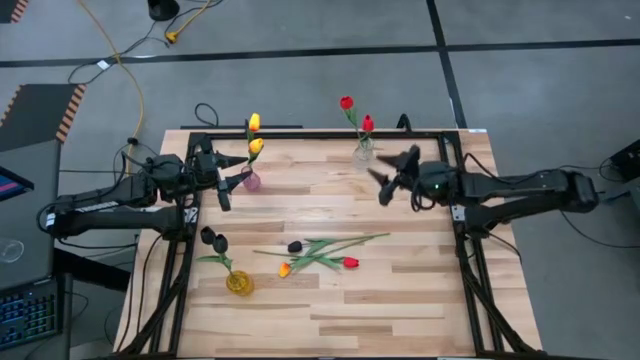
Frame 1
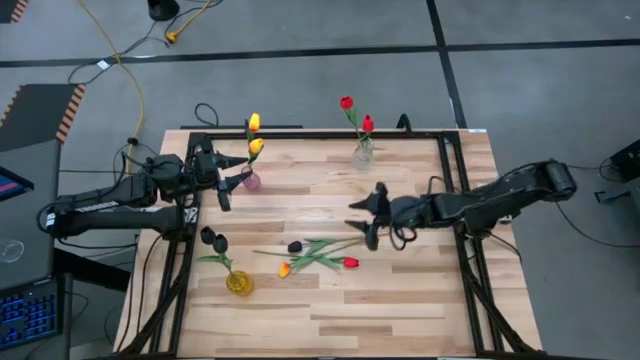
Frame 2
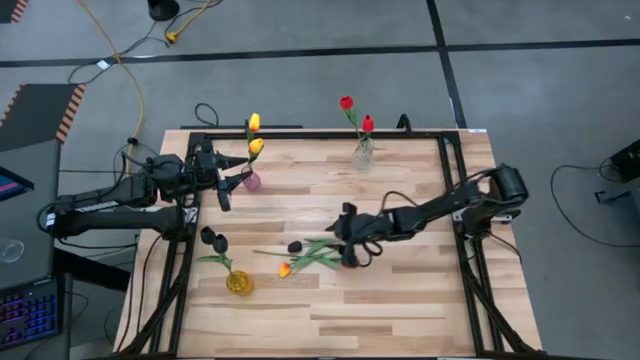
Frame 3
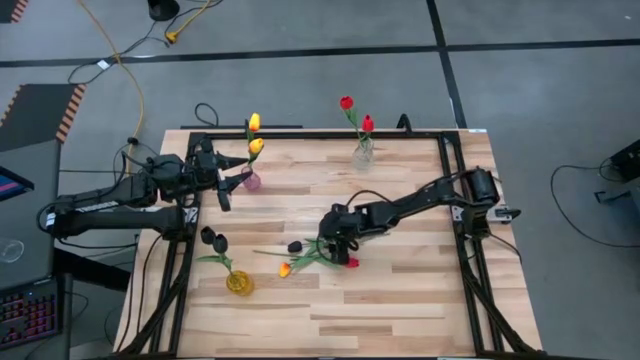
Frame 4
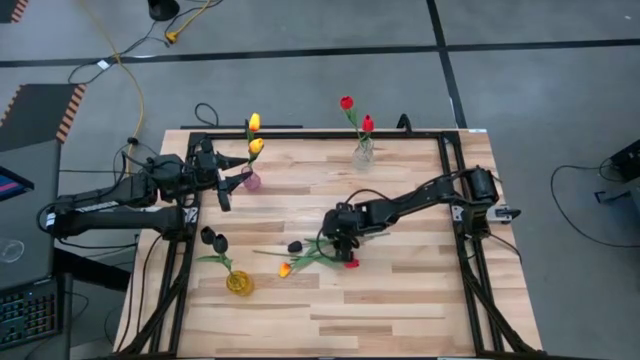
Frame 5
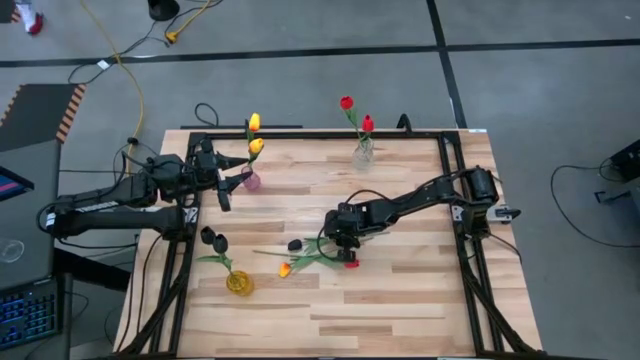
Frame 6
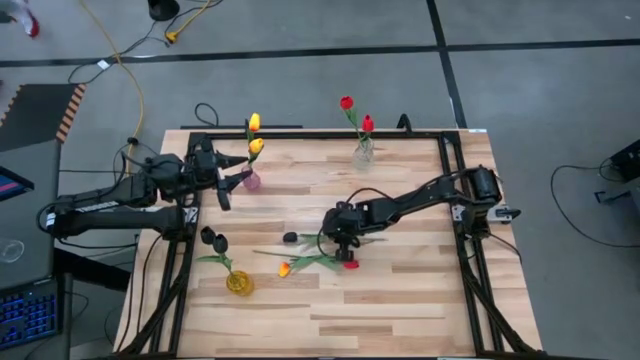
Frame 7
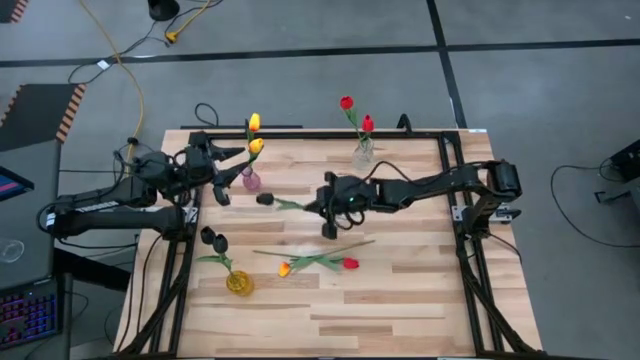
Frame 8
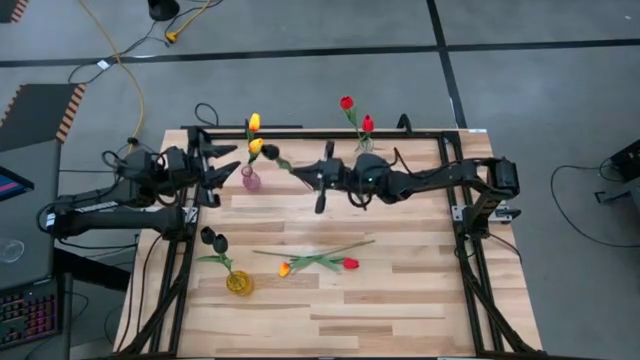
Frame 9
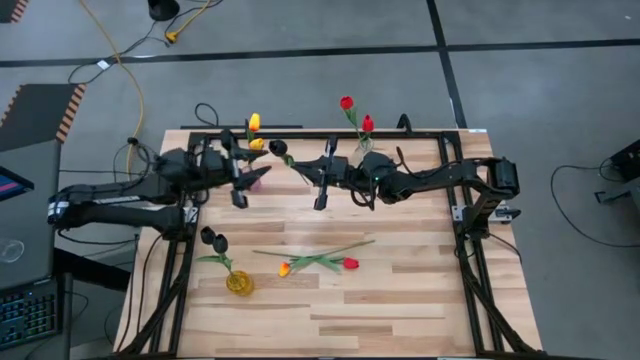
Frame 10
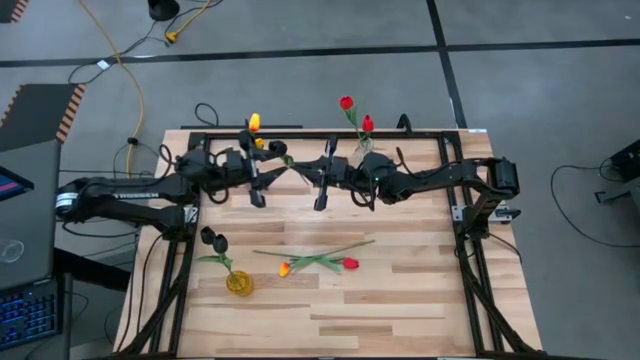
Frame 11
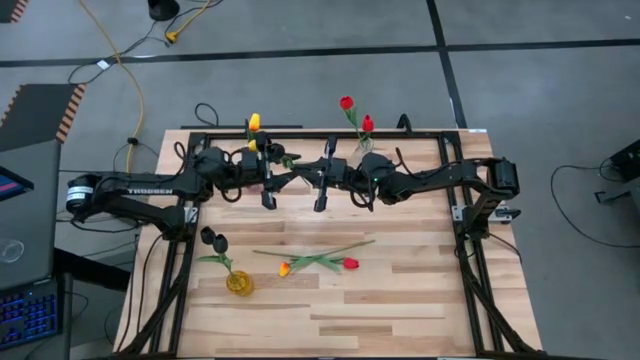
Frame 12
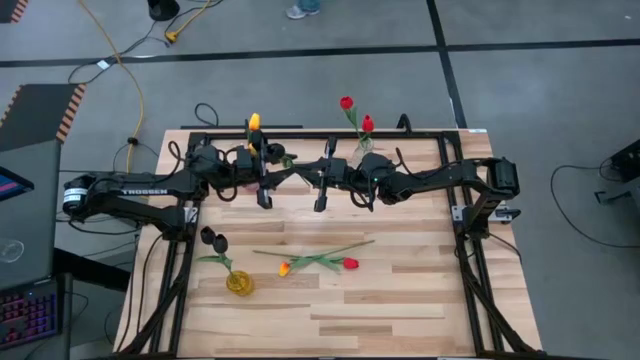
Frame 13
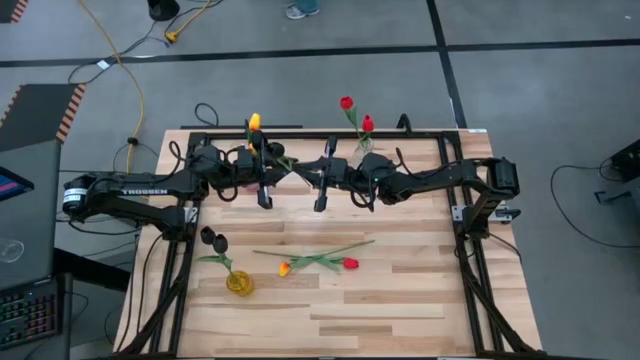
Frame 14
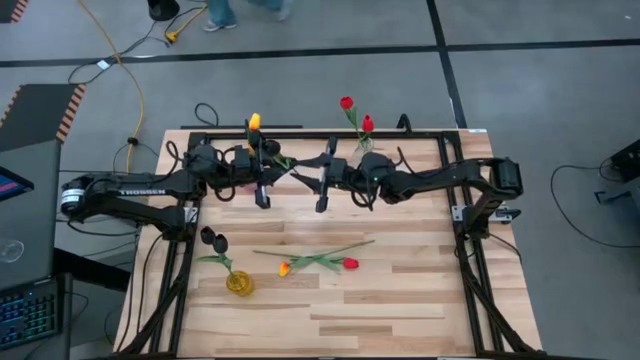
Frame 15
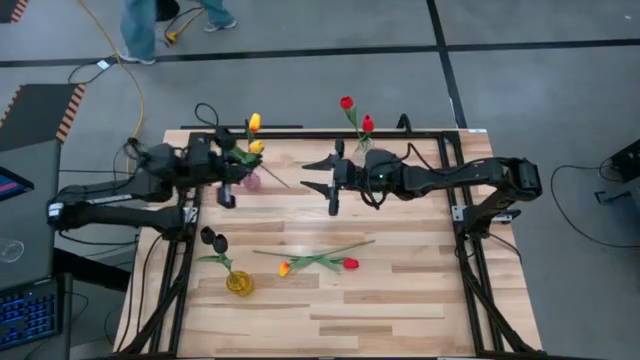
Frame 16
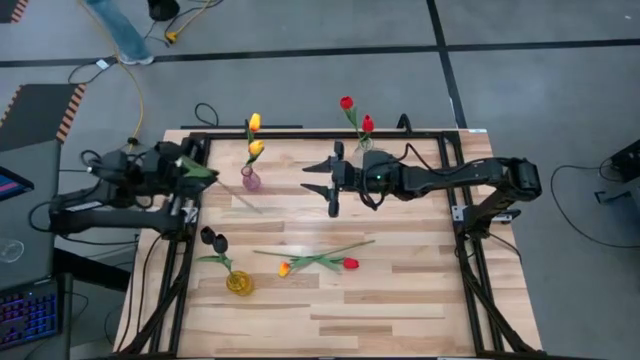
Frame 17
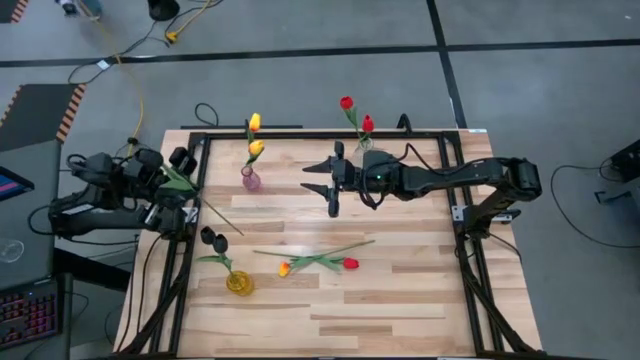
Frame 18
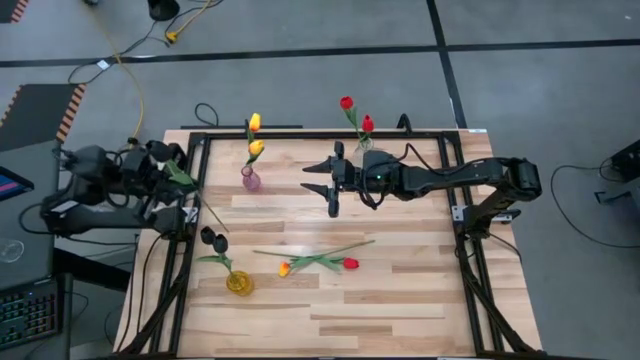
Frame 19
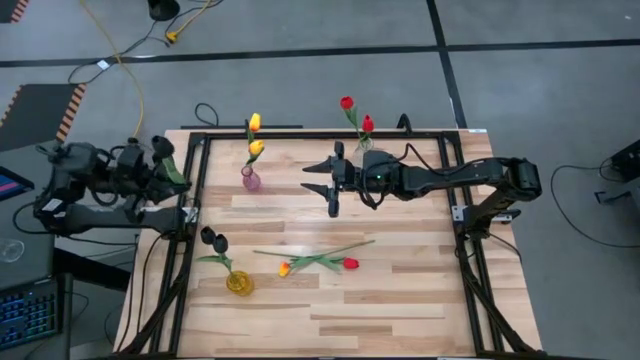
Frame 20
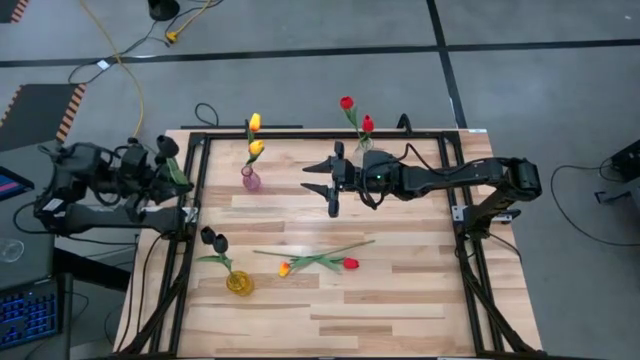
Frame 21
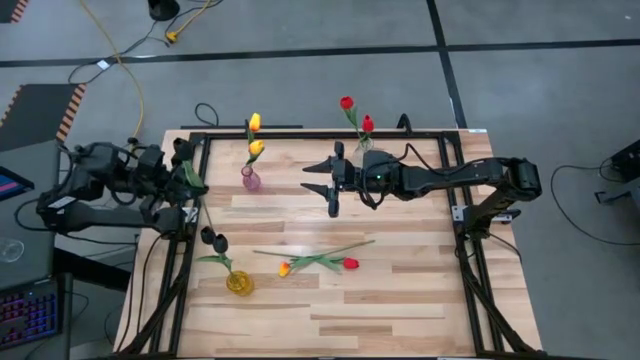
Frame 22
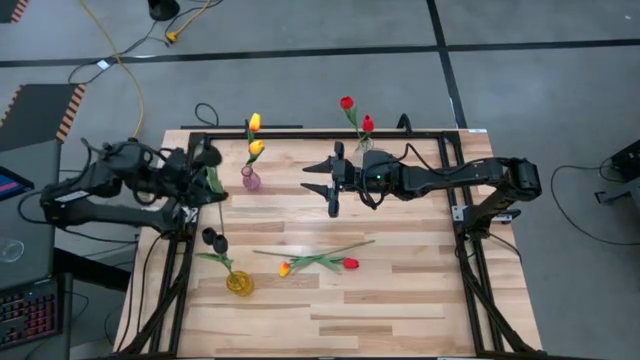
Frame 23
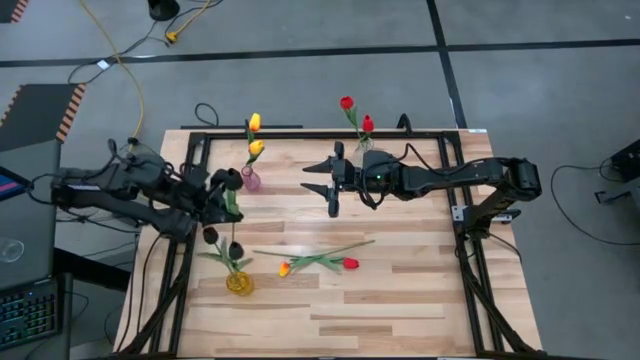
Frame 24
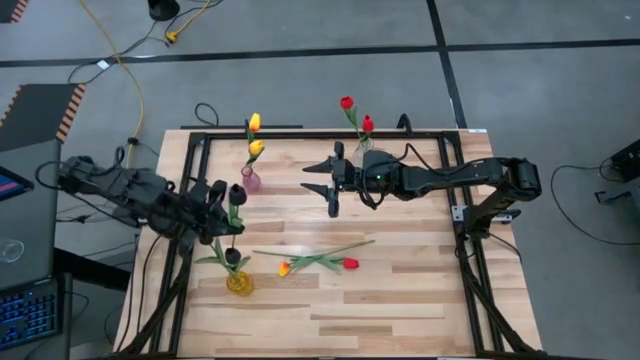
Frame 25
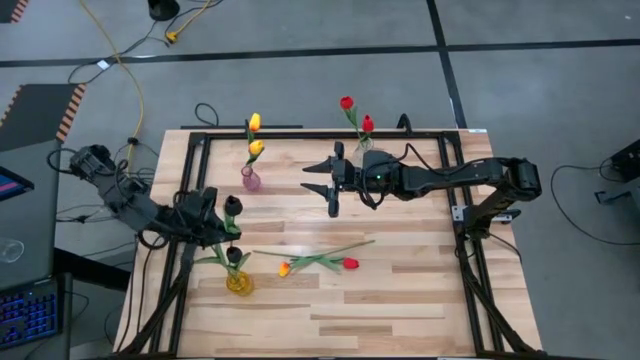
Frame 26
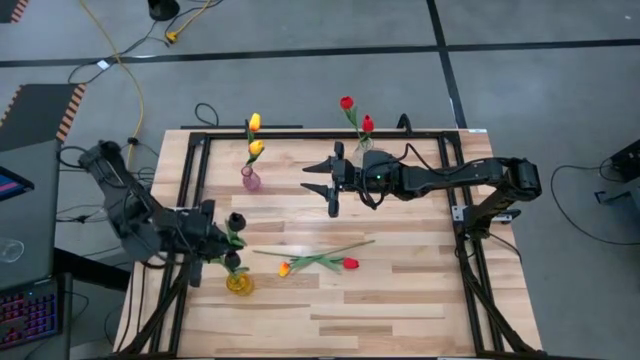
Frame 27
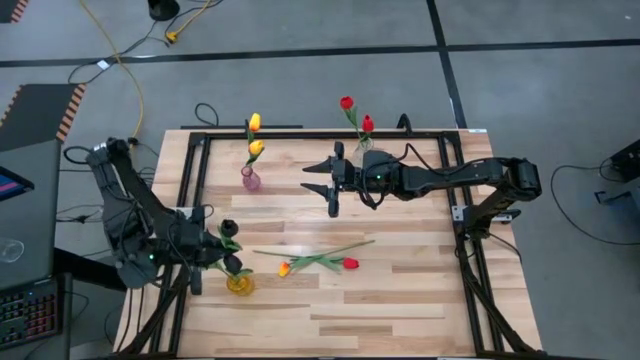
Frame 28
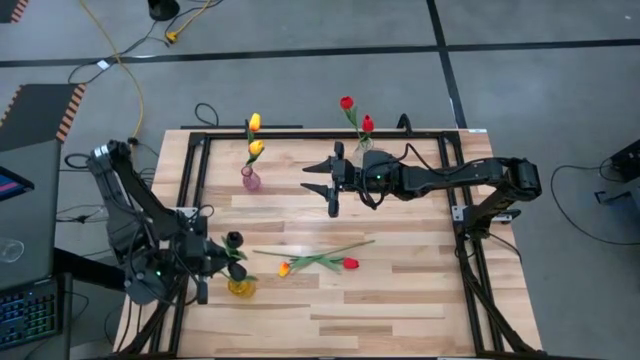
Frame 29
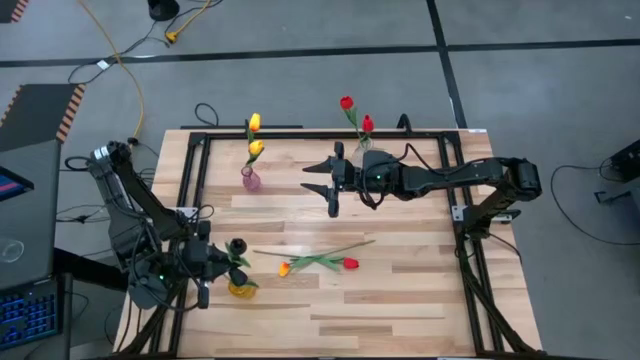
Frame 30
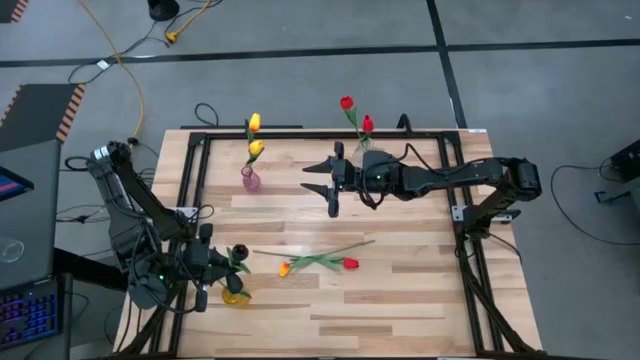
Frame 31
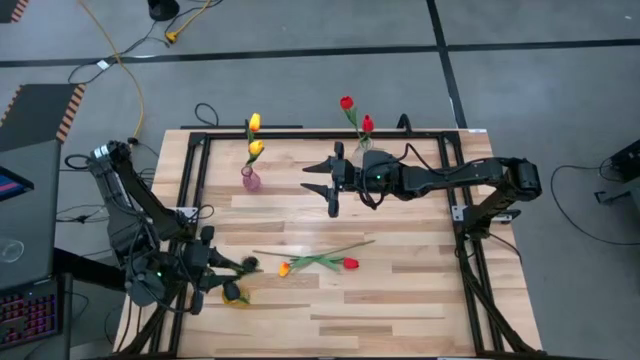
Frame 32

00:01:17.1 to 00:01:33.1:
Task: Sort flowers into vase by color
Put the black tulip into the yellow vase

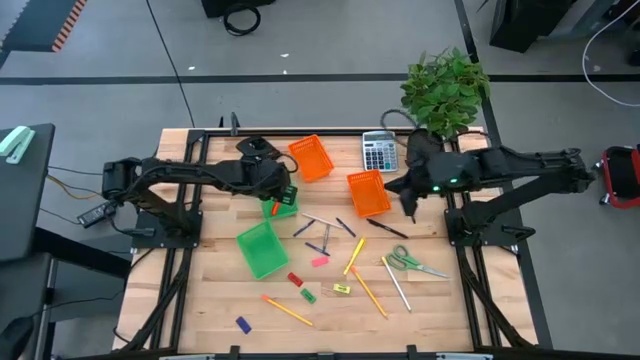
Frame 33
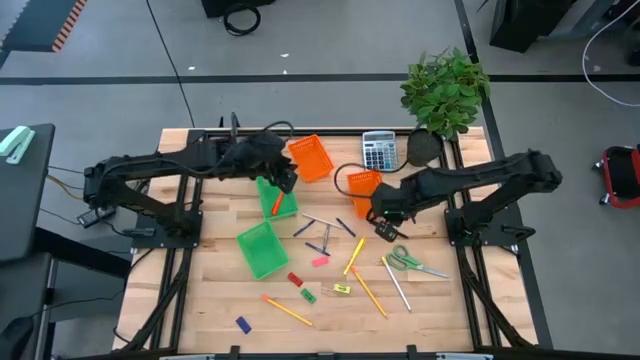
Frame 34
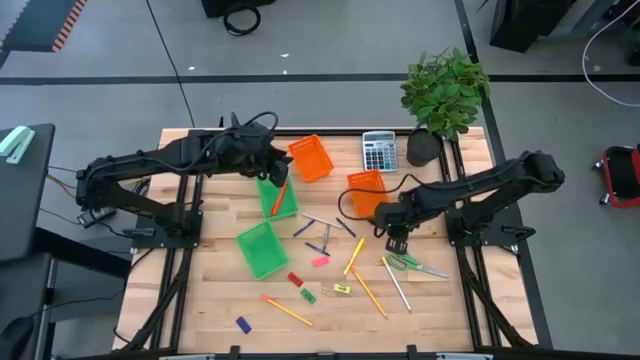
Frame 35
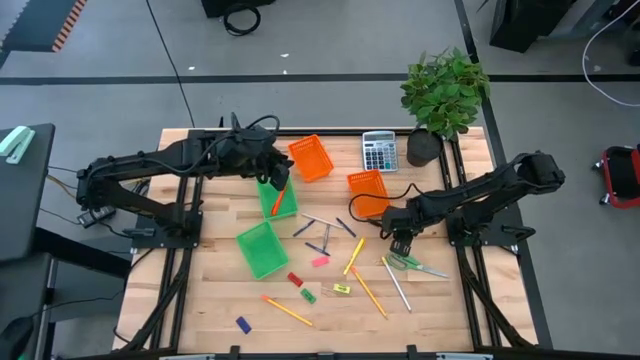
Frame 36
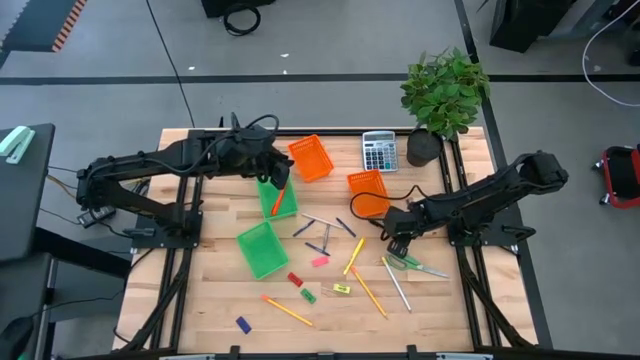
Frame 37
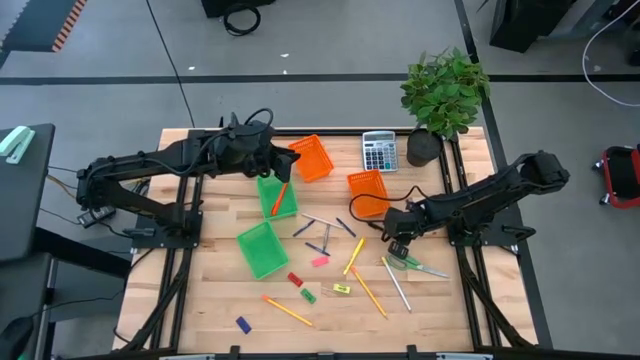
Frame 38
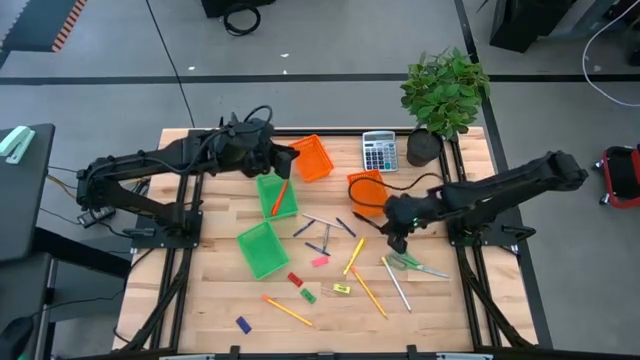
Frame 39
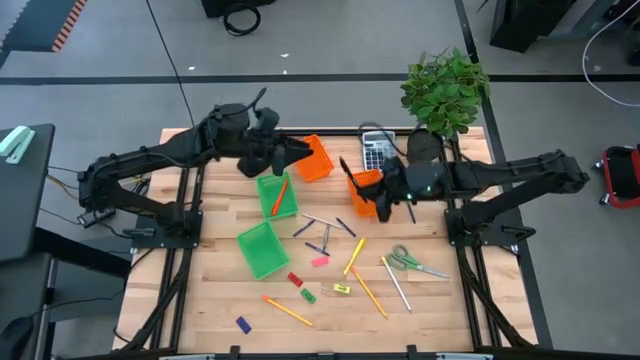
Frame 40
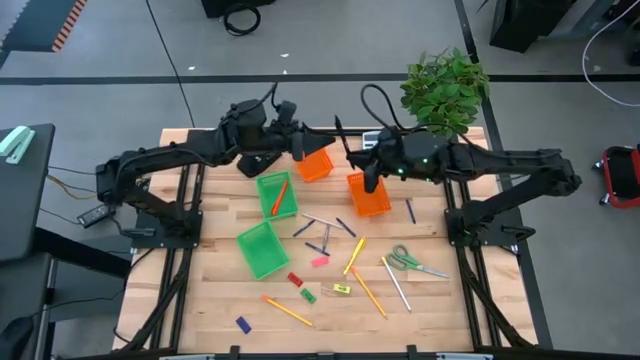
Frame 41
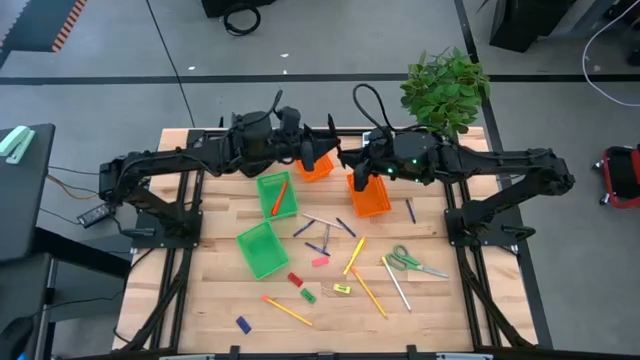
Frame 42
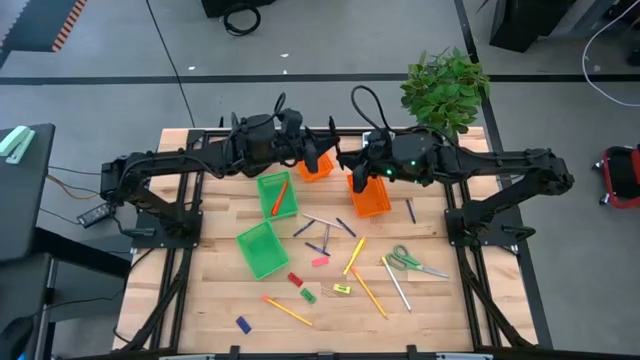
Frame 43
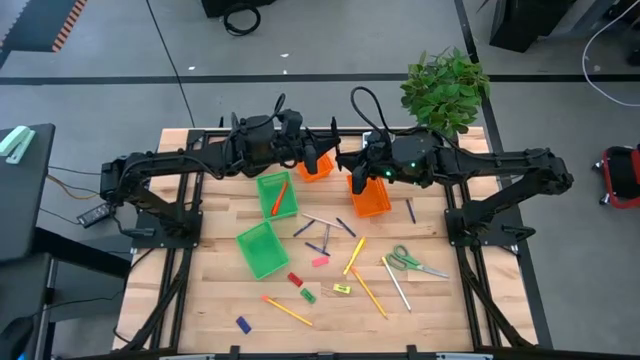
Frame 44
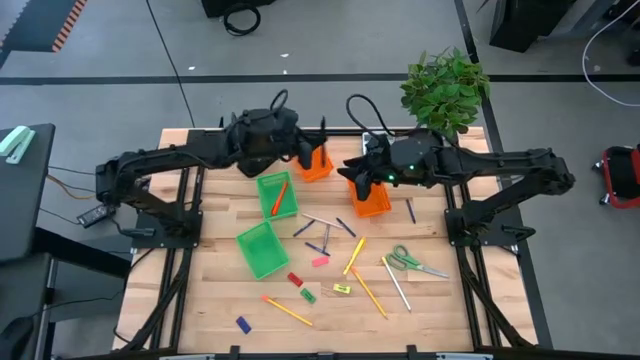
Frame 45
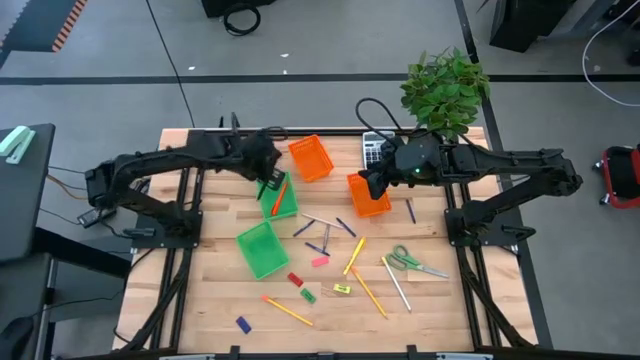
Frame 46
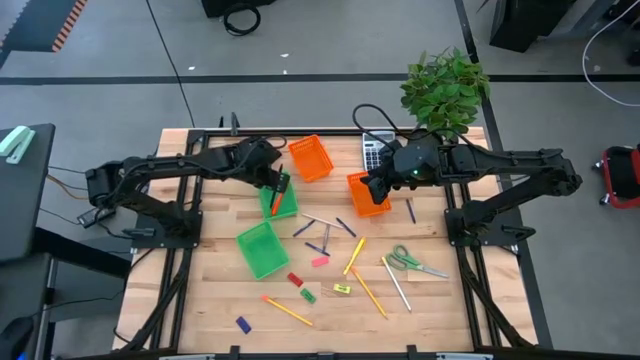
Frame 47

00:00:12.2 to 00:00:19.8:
Task: Sort crayons/erasers/pens/pencils in bins
Put the black pen into the top green bin
